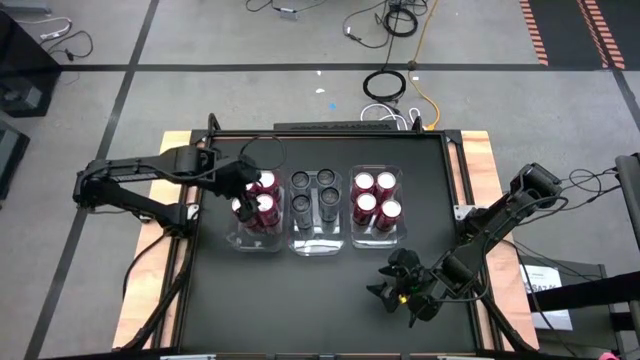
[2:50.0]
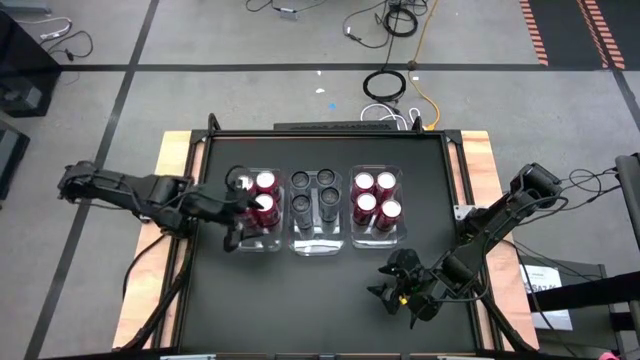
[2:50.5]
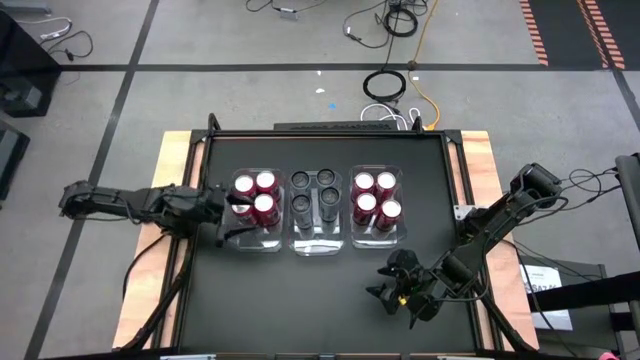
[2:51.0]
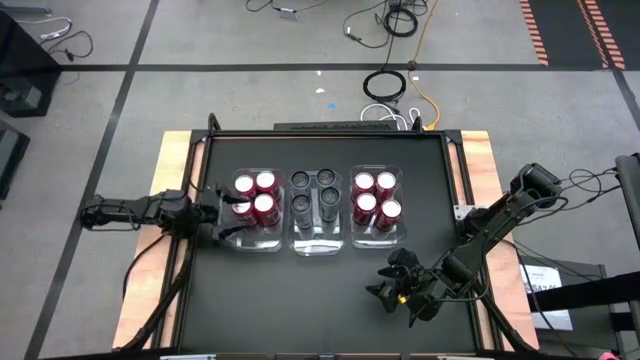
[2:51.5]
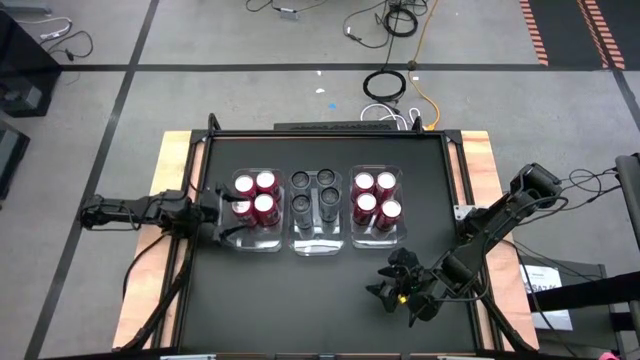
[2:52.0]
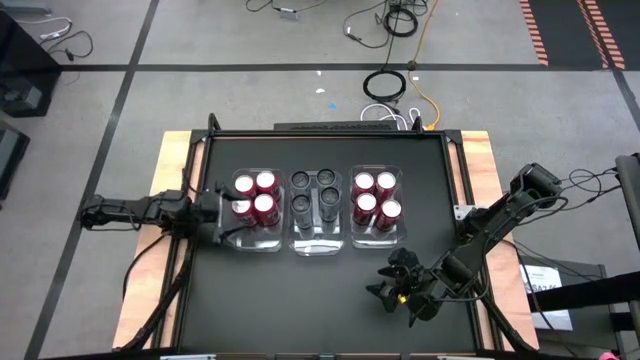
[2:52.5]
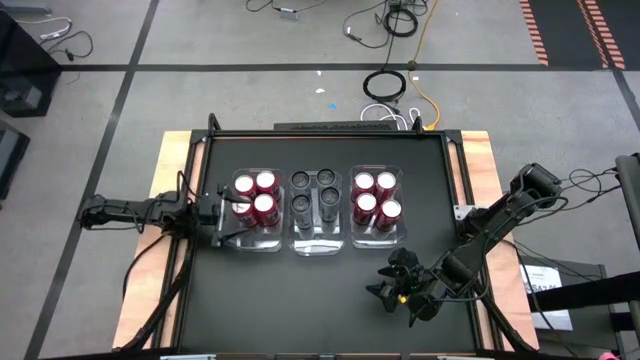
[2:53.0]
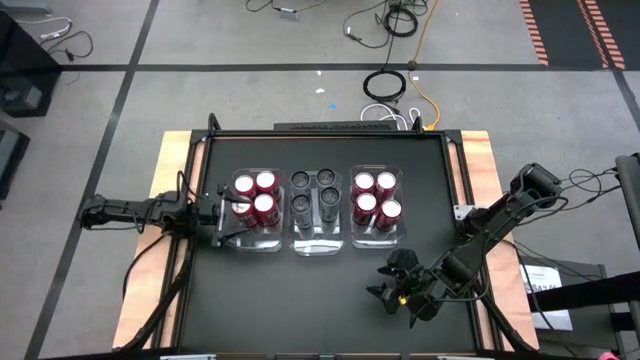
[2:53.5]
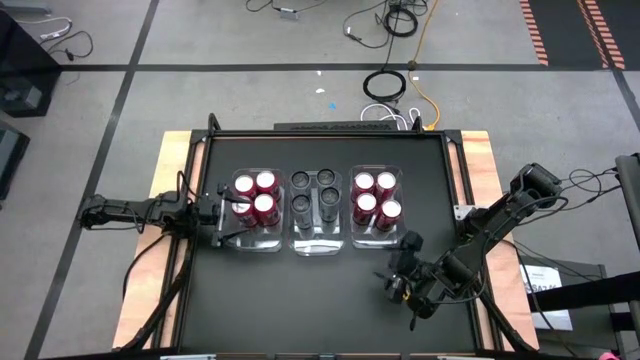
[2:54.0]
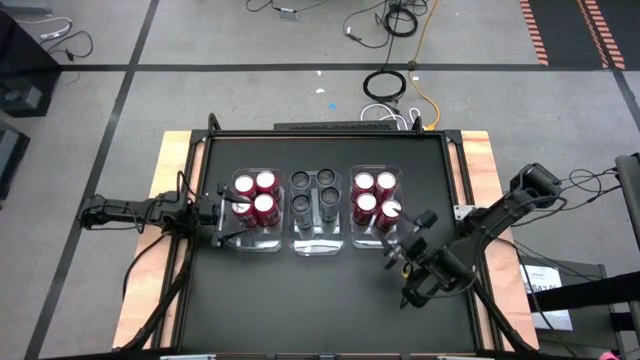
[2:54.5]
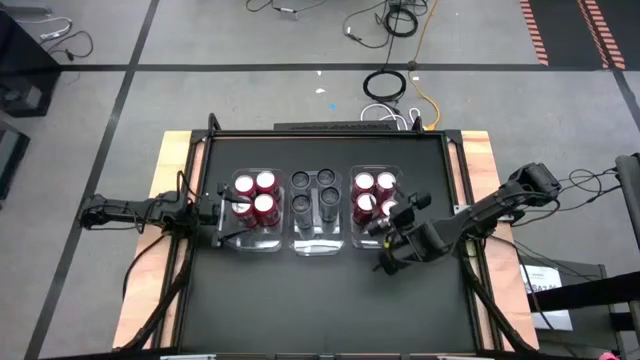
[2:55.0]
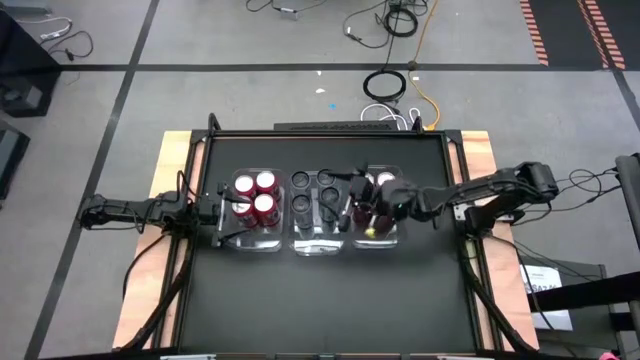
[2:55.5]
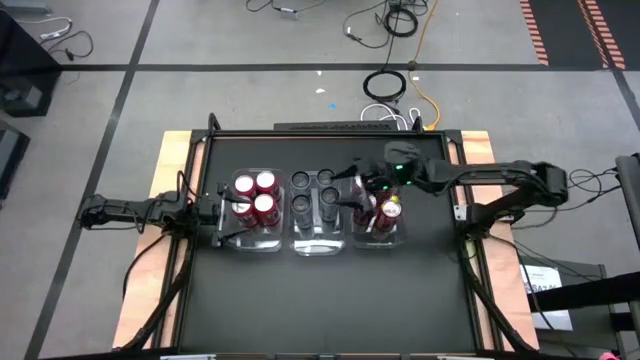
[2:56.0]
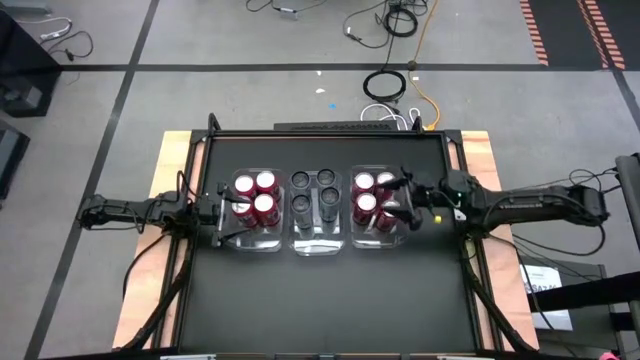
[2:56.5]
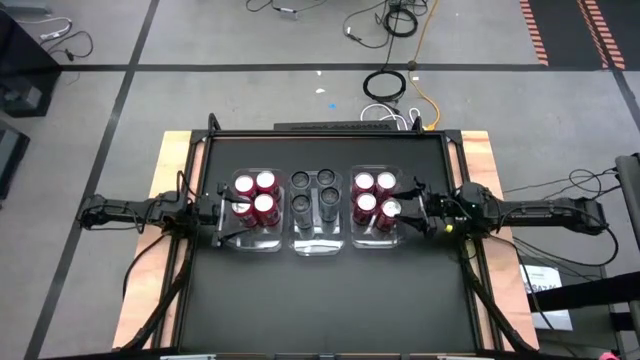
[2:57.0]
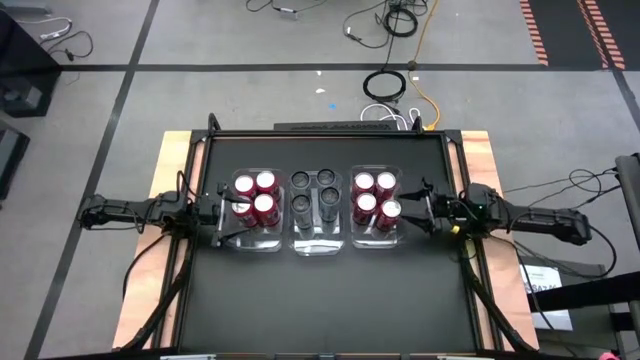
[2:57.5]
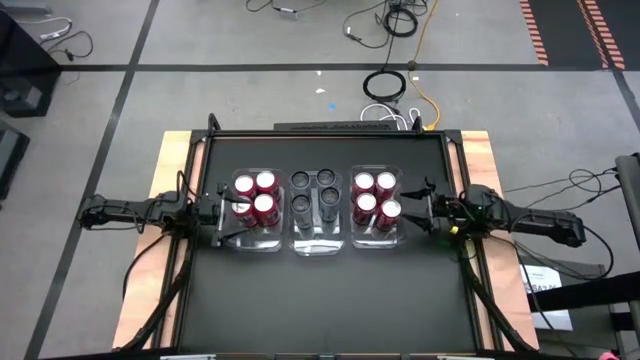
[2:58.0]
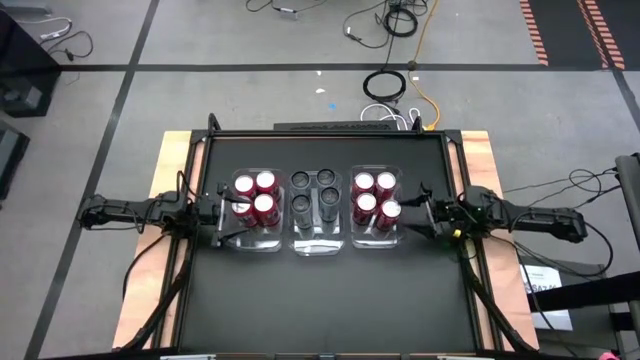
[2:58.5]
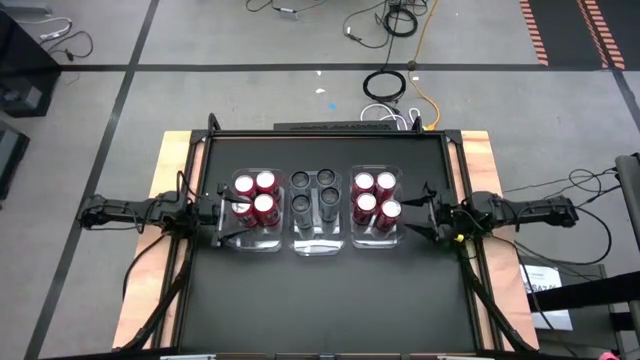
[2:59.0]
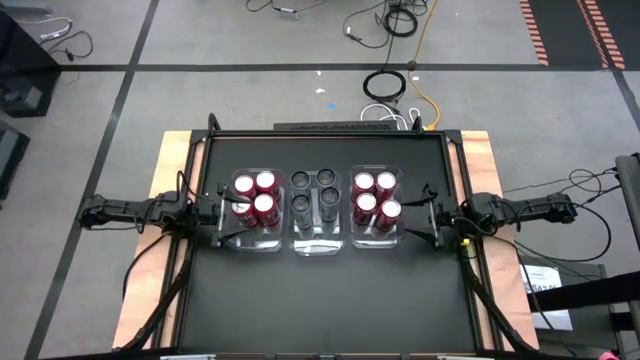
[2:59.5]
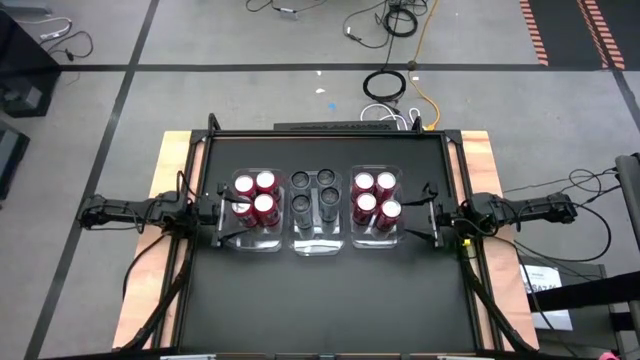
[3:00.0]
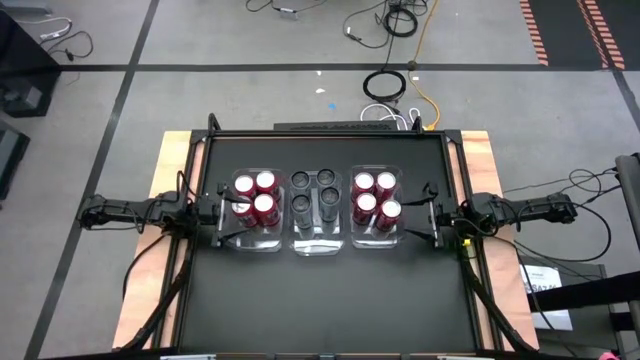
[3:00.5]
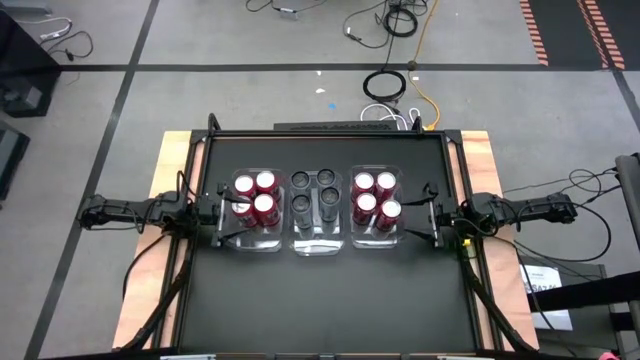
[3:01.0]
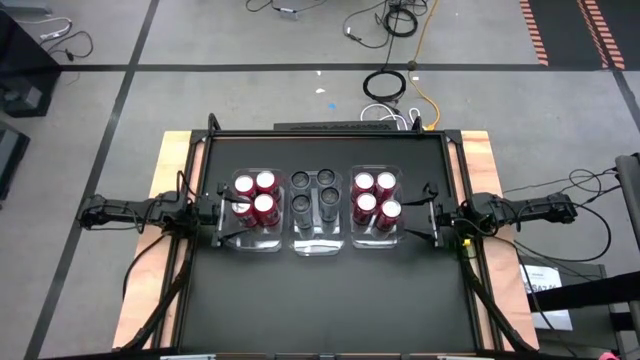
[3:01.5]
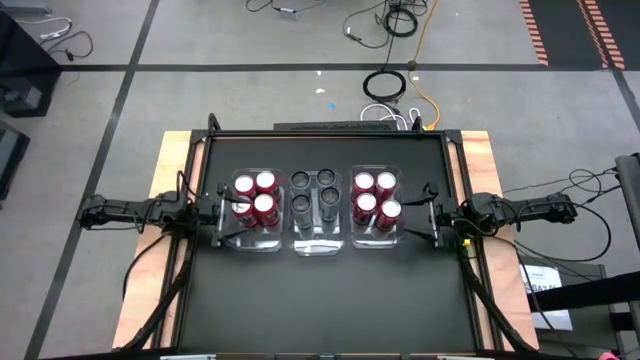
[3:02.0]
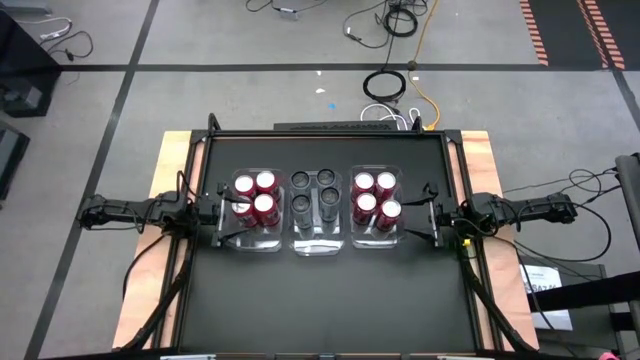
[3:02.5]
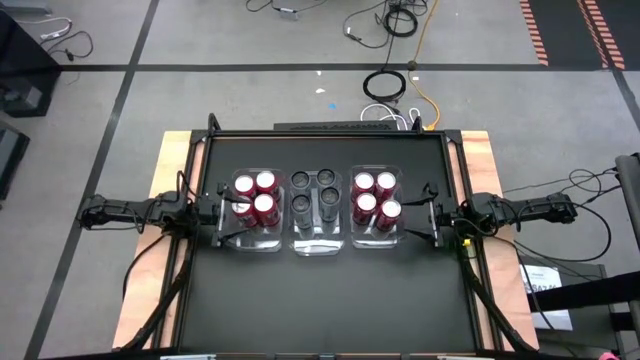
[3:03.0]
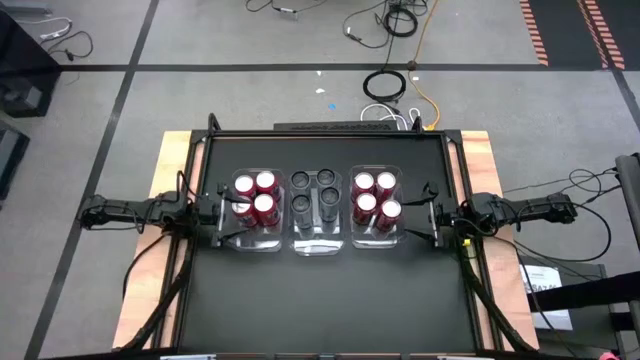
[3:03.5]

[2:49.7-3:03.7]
Task: Sort soda cans
Return to Home Position

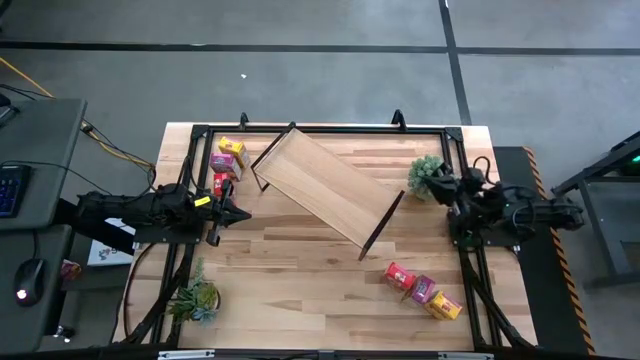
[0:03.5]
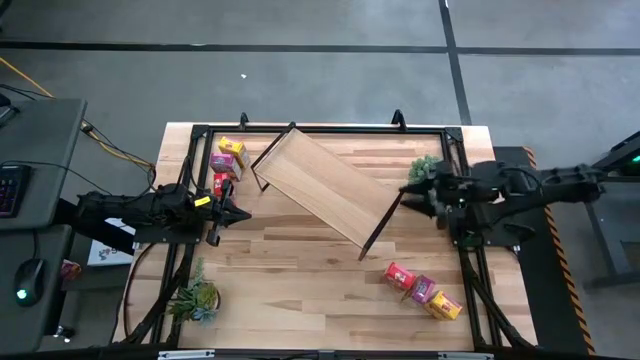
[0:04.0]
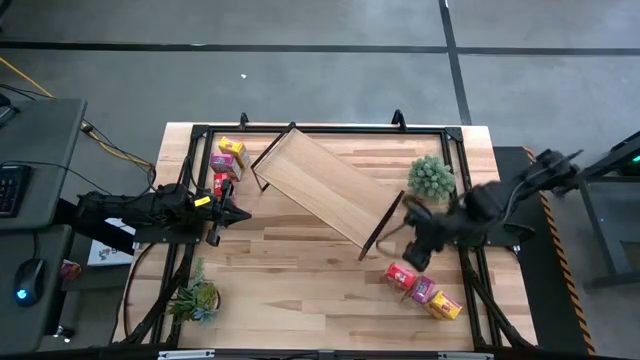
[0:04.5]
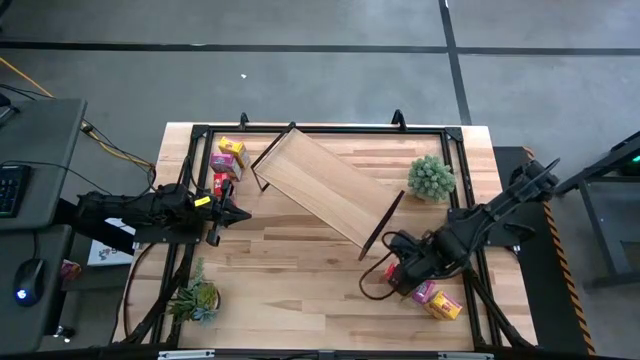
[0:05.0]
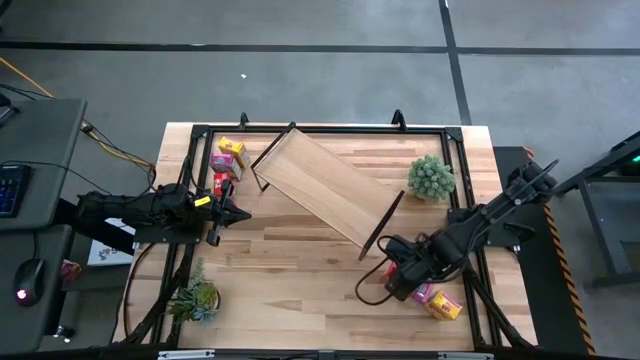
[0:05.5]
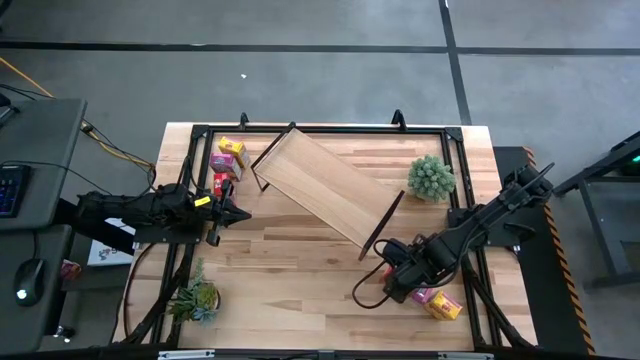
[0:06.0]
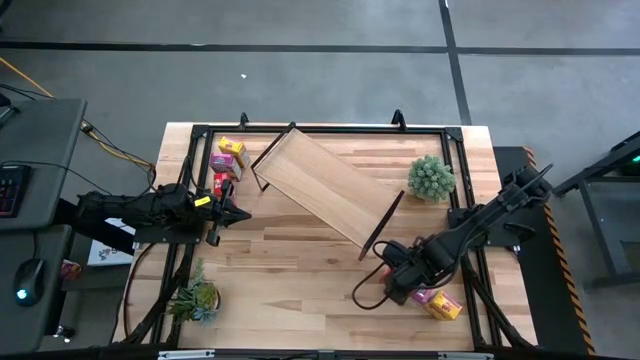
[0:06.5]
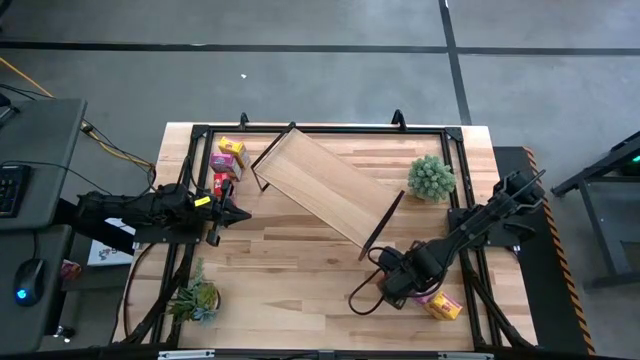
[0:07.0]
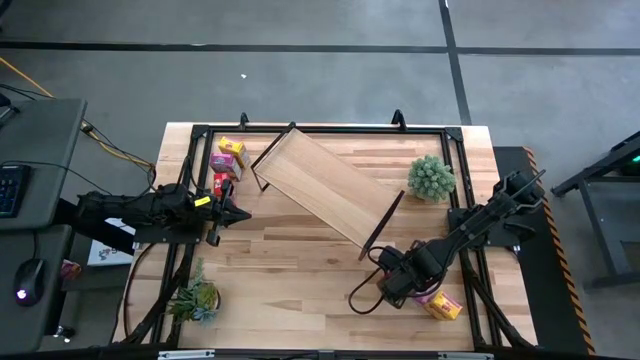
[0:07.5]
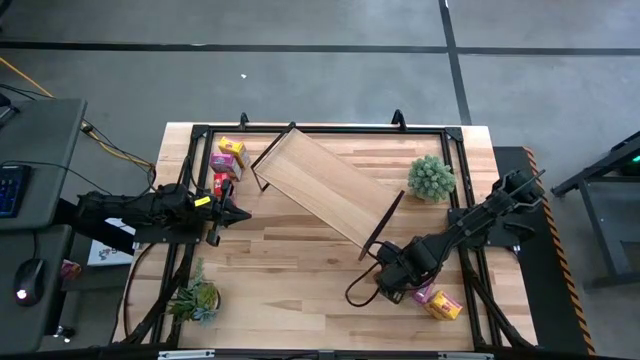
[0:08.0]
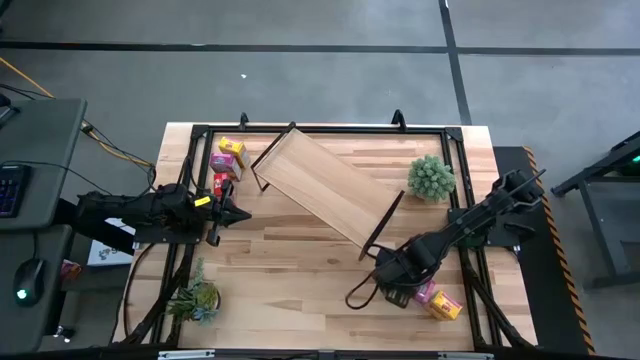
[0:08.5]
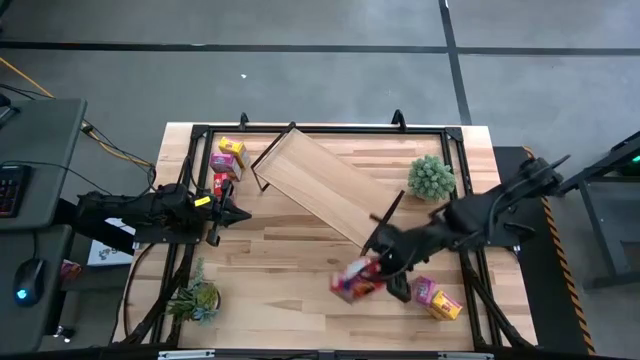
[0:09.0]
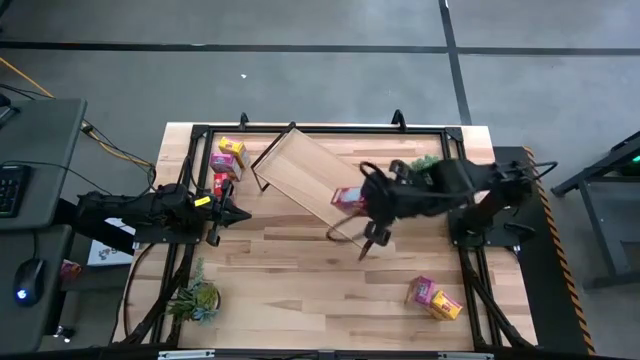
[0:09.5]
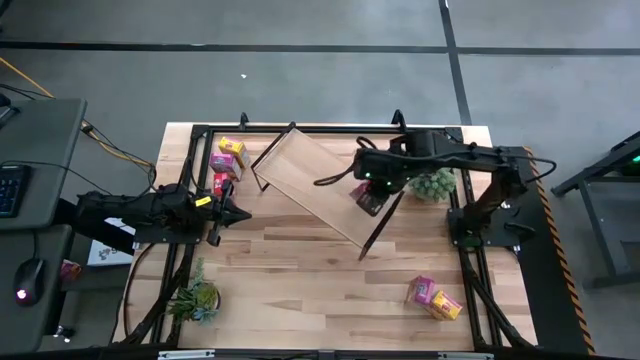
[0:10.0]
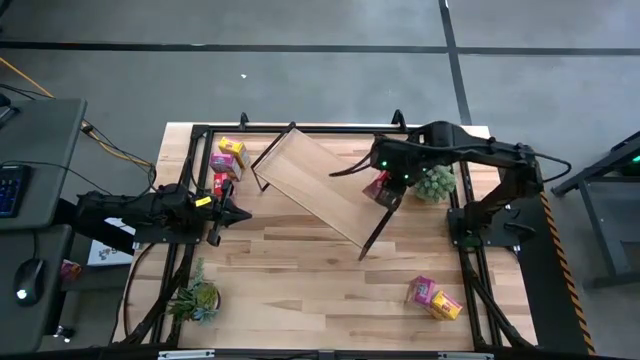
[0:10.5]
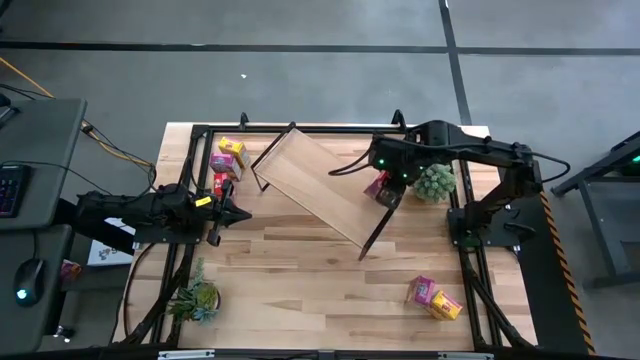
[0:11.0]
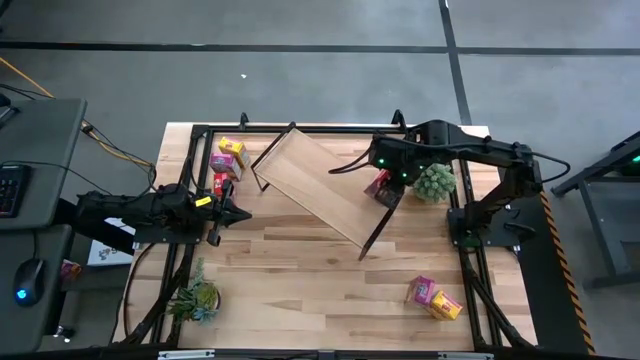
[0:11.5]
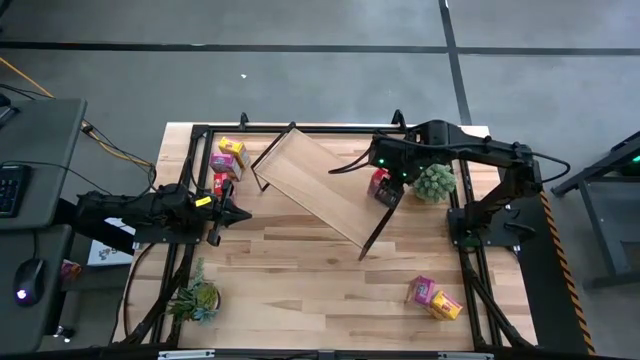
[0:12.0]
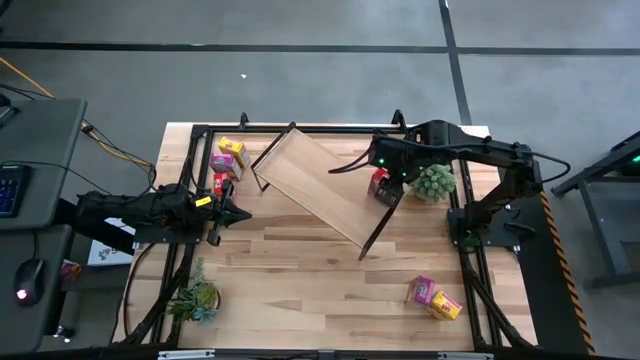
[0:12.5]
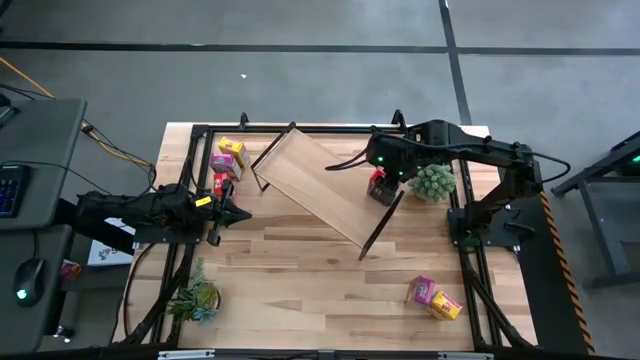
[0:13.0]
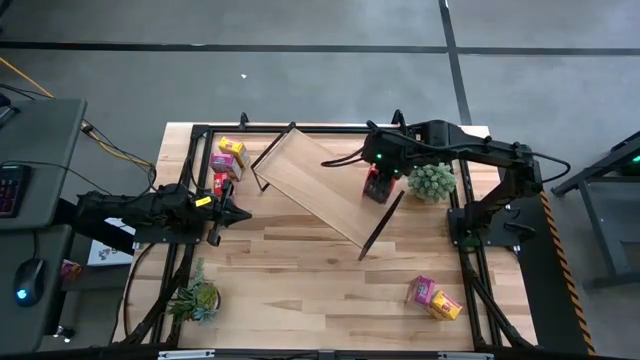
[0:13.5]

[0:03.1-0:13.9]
Task: Stack cereal on shelf
Put the bottom red cereal box on the shelf
